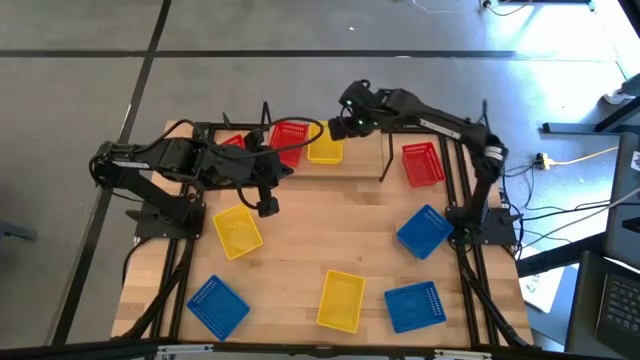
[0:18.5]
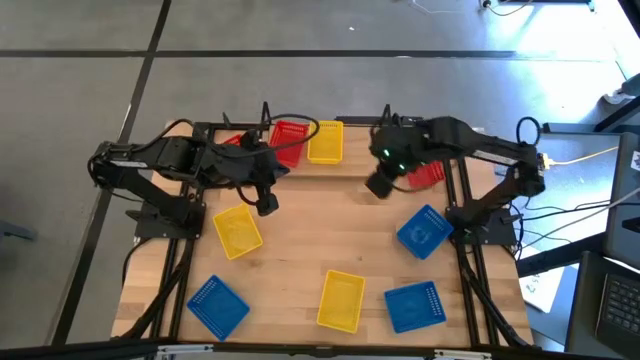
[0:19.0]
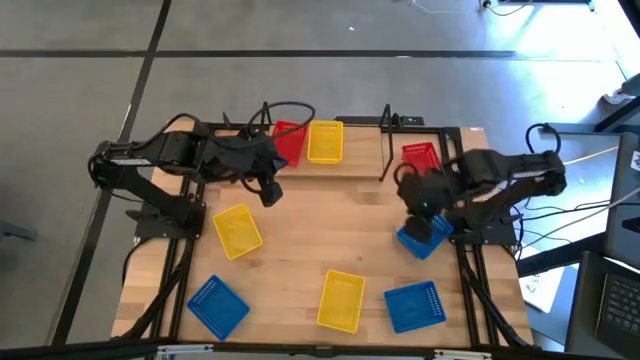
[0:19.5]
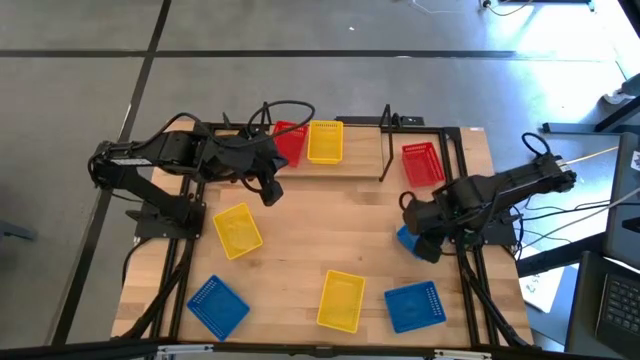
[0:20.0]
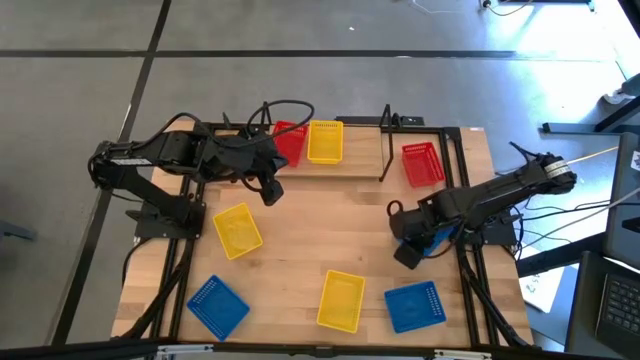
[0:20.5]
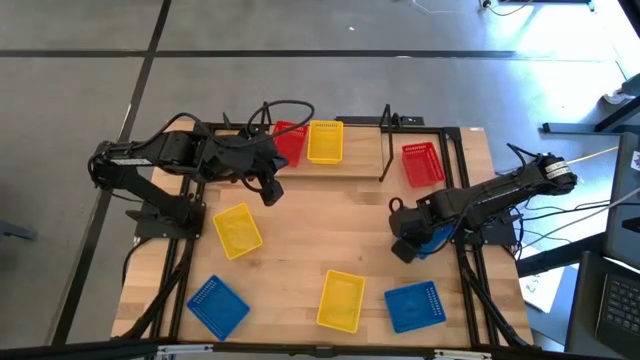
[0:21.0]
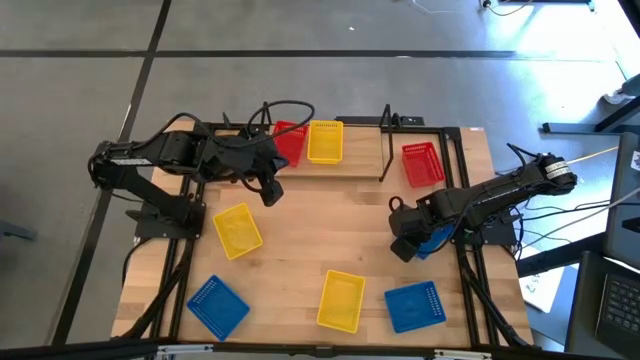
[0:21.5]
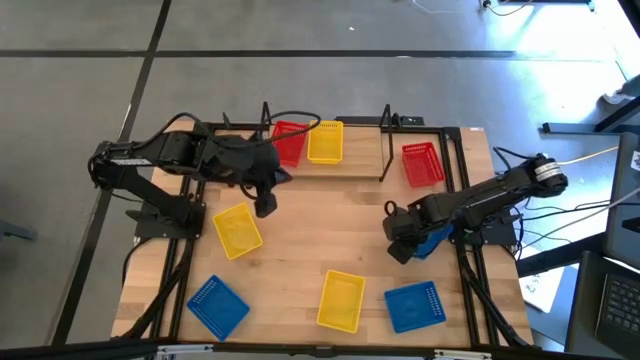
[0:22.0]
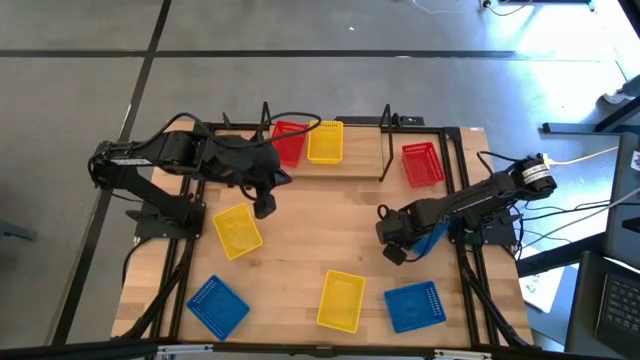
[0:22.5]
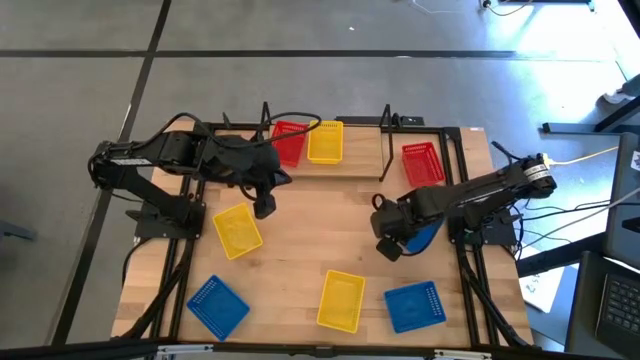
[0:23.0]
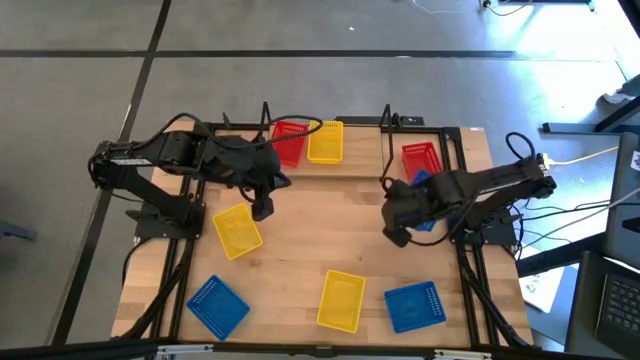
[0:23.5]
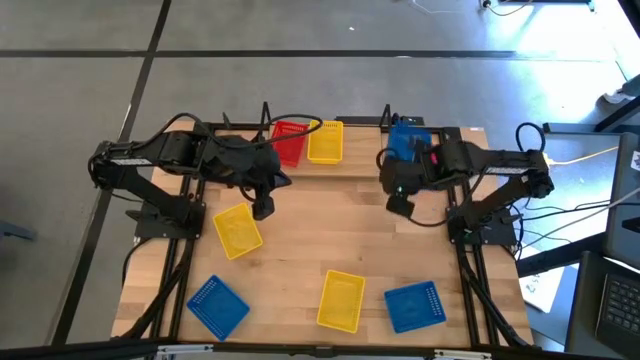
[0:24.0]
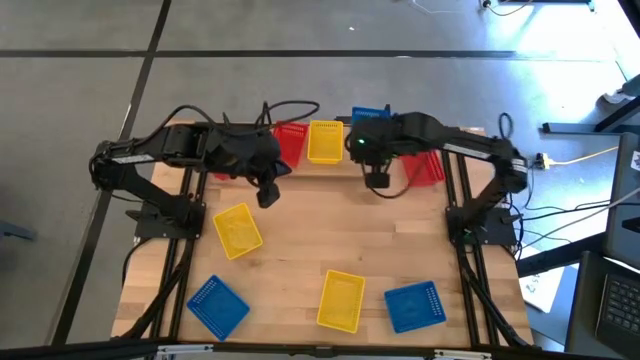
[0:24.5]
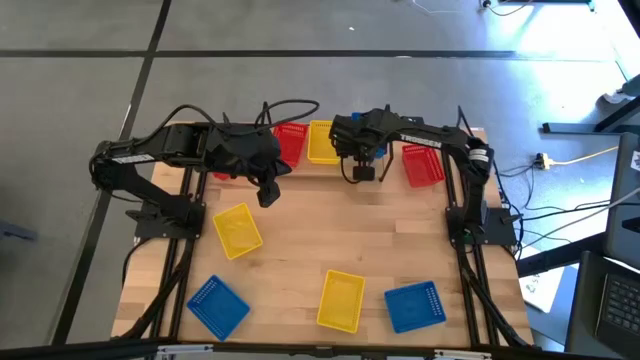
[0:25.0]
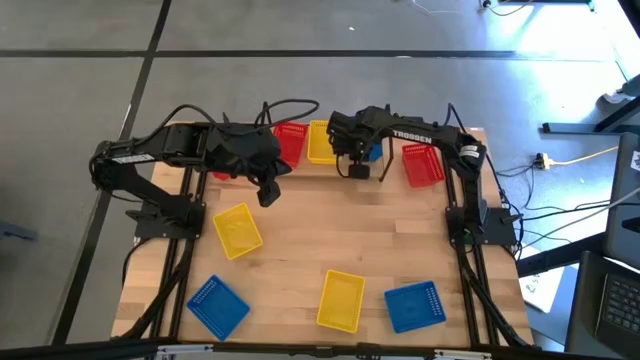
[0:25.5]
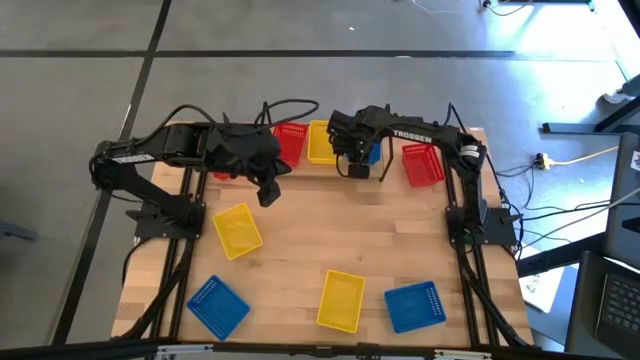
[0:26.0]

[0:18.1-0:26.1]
Task: Stack baskets on shelf by color
Put the top blue bin on the shelf

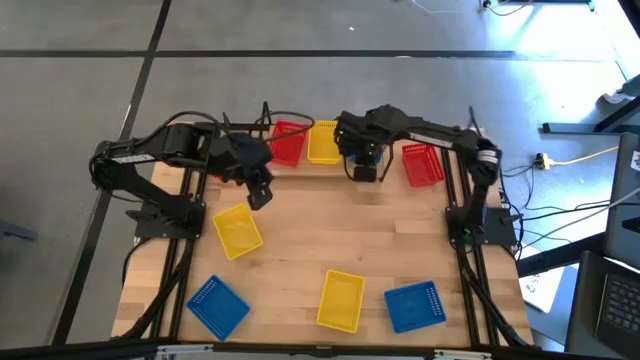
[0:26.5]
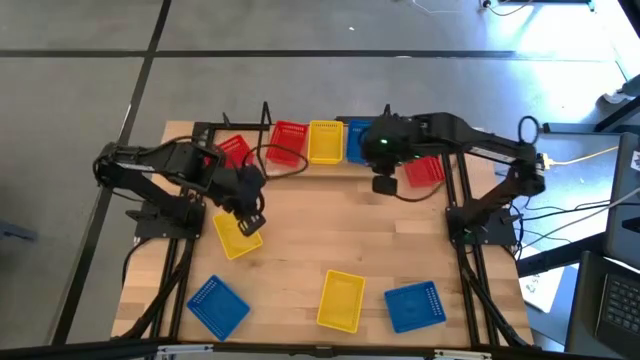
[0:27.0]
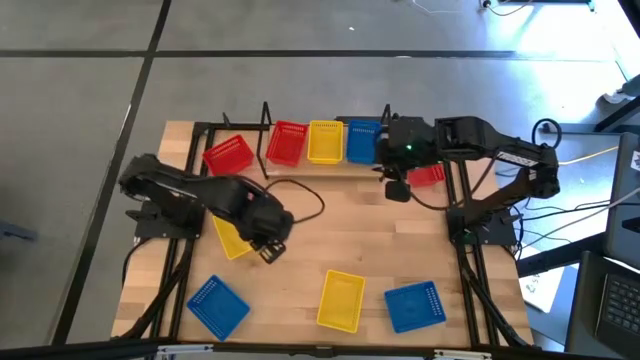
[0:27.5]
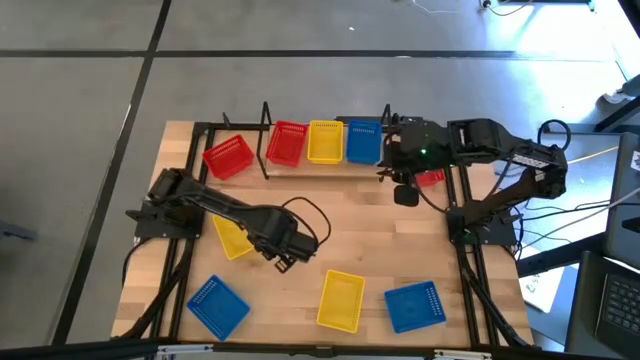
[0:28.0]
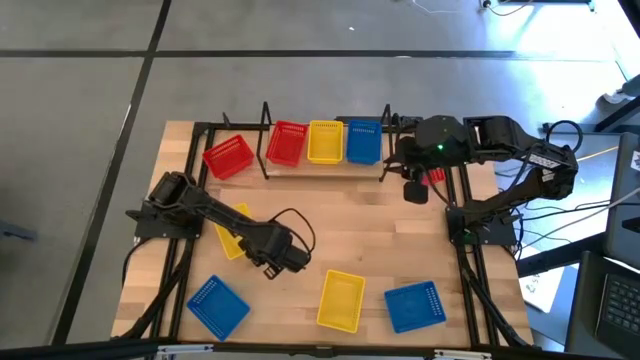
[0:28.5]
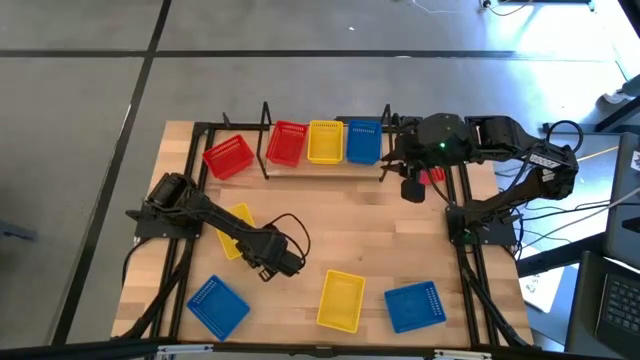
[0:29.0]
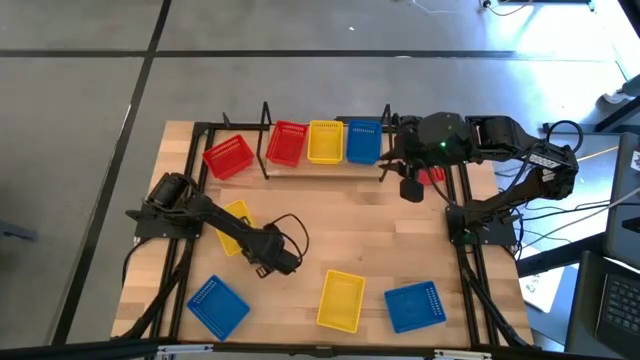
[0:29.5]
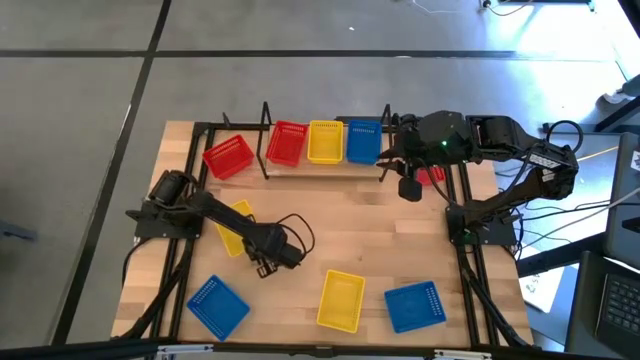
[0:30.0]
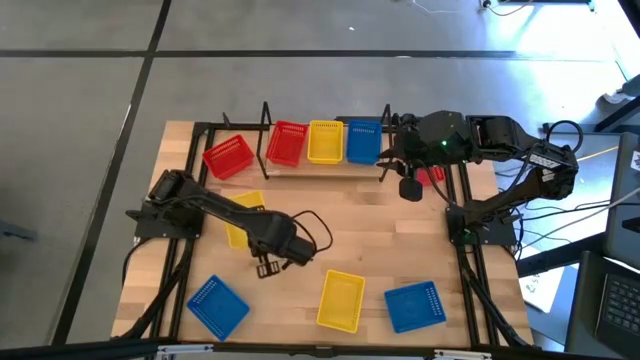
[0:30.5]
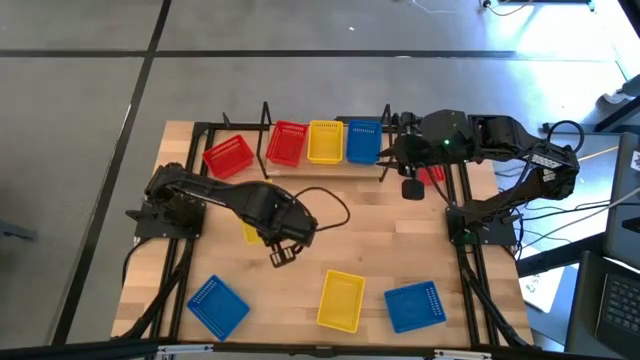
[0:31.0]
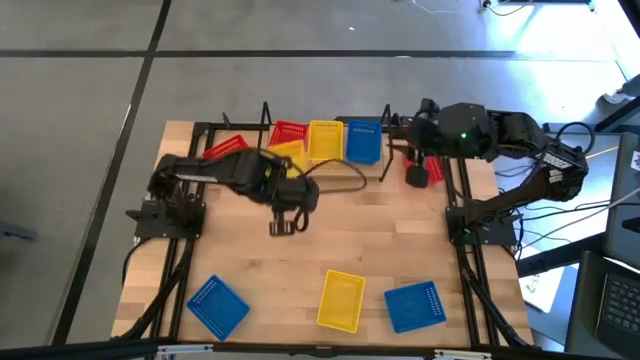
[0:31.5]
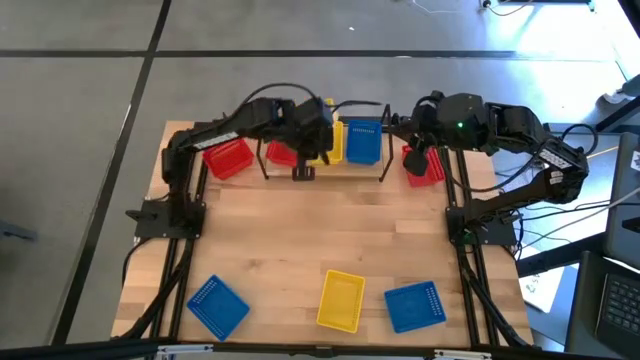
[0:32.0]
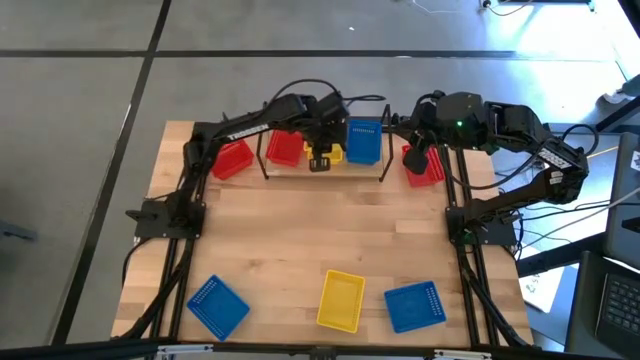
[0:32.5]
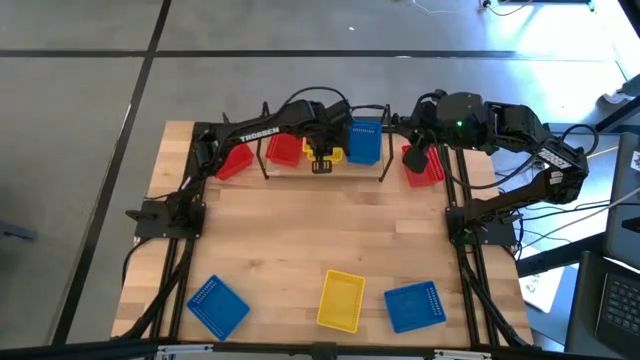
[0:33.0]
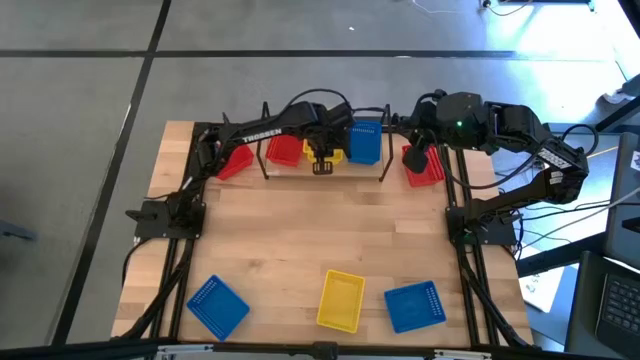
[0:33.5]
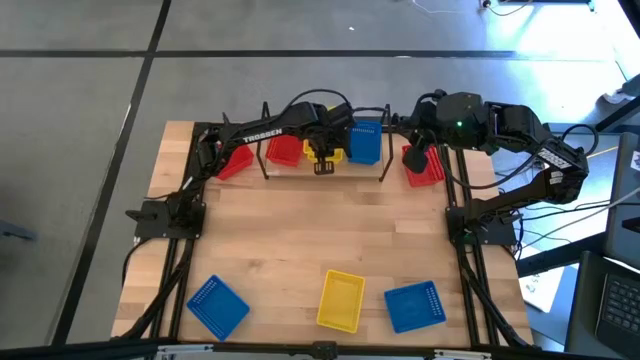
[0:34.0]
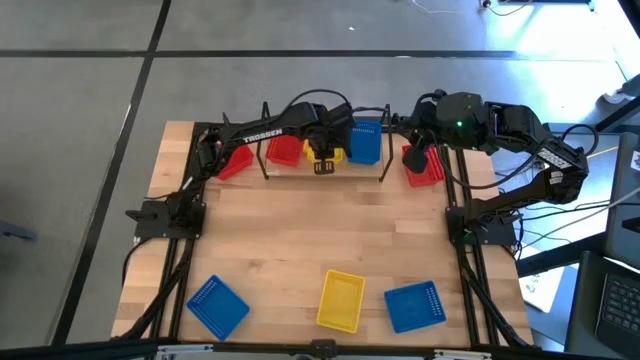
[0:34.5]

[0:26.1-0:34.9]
Stack the top yellow bin on the yellow bin on the shelf

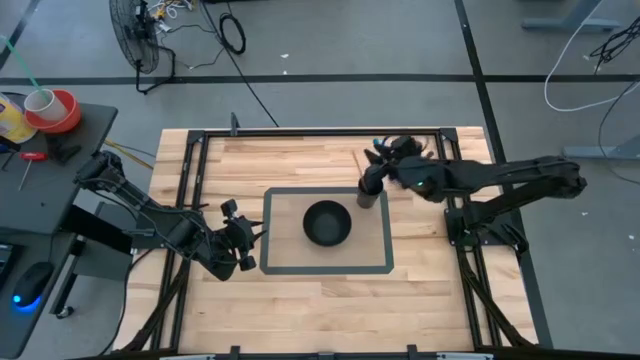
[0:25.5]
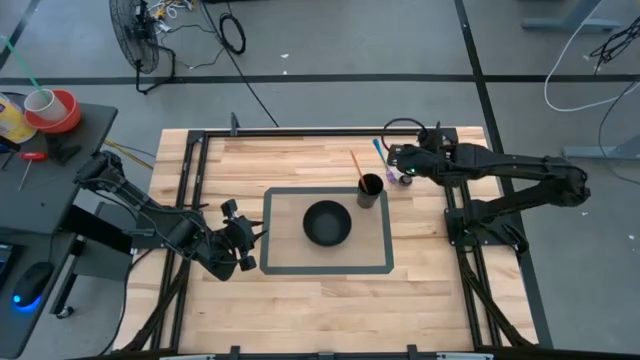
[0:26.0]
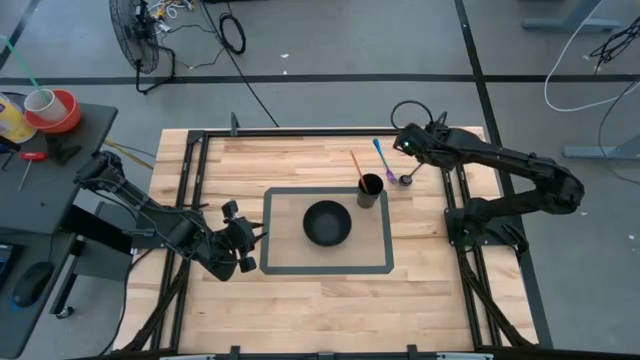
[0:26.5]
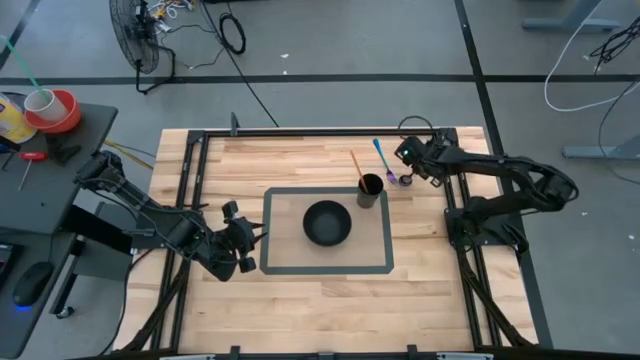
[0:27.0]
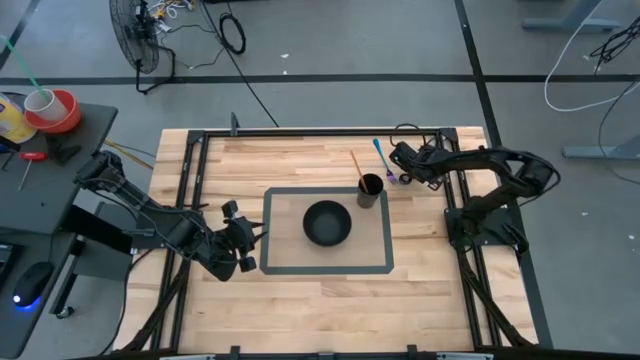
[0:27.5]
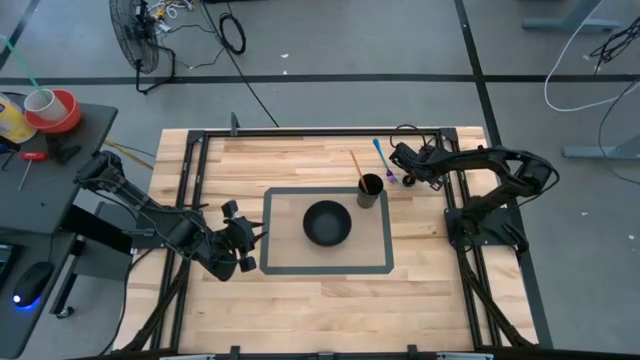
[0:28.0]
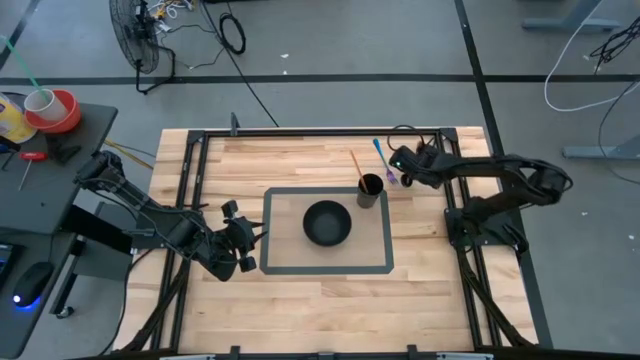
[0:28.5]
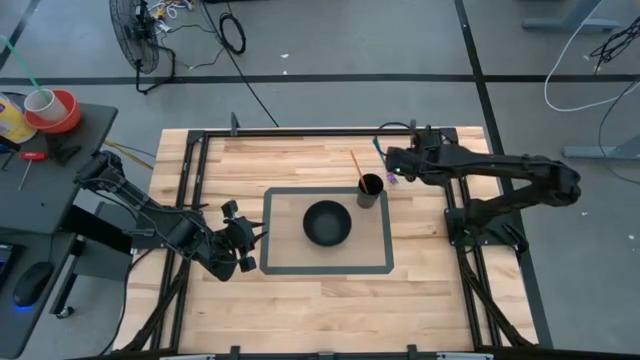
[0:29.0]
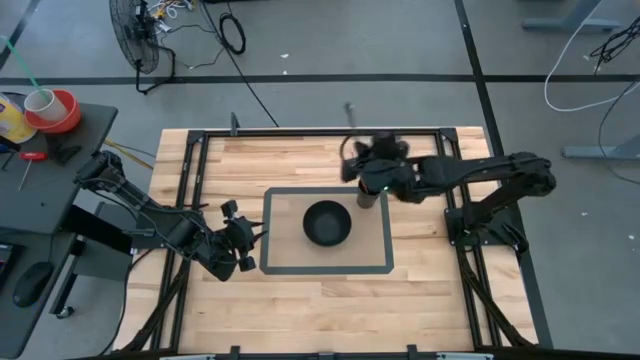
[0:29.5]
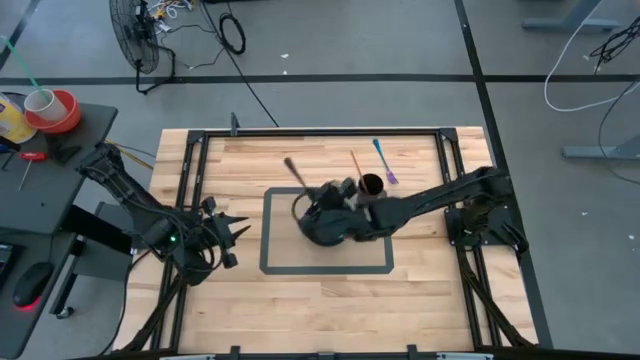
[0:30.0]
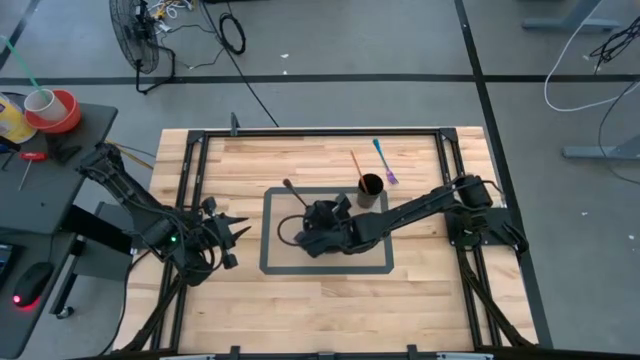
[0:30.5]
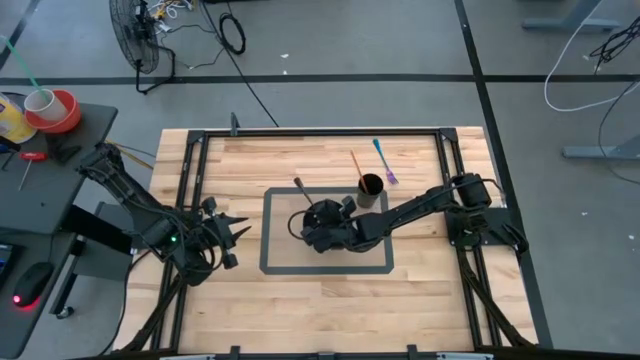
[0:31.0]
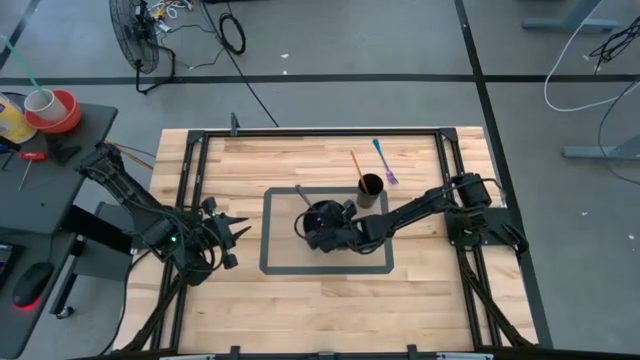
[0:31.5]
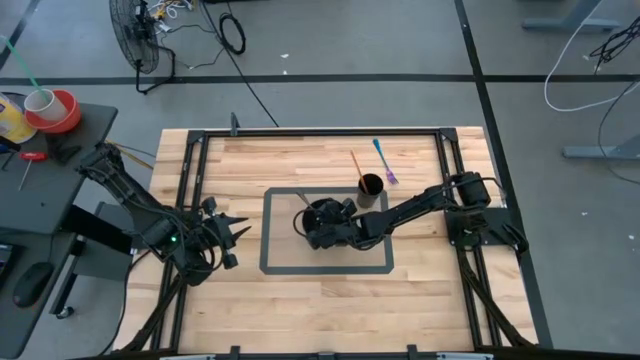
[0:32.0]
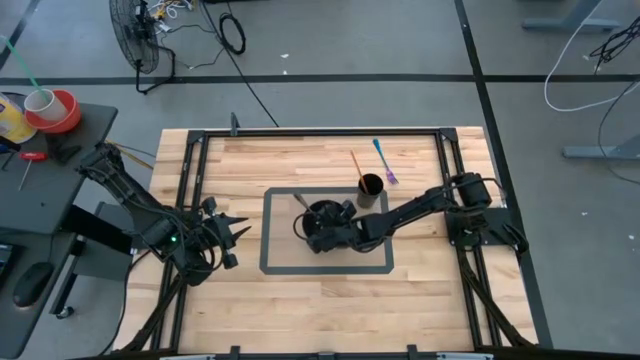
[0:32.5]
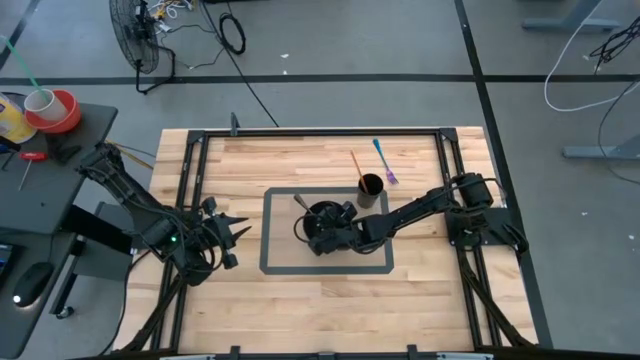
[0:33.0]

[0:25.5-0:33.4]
Task: Pick & Place Utensil
Put the black spoon into the black bowl on the transparent mat
